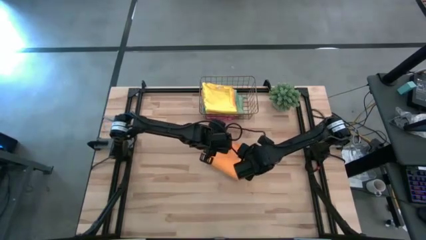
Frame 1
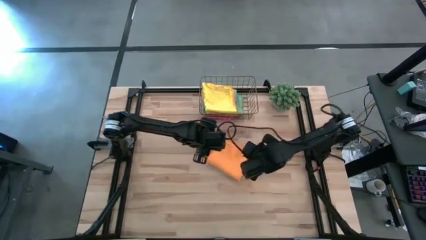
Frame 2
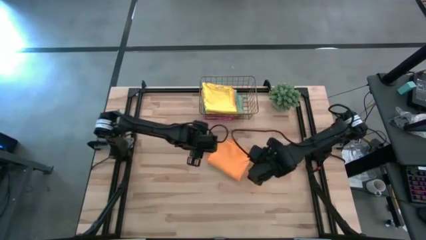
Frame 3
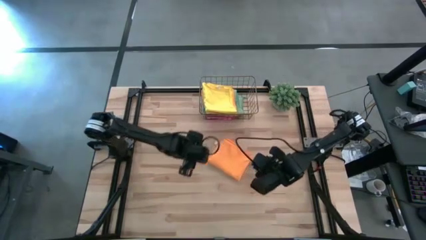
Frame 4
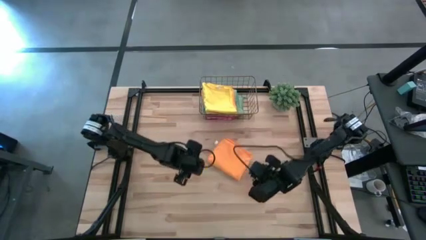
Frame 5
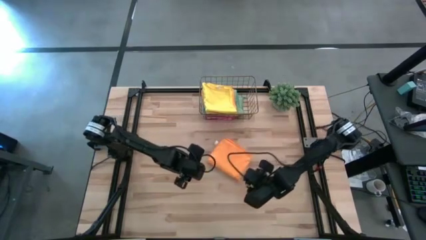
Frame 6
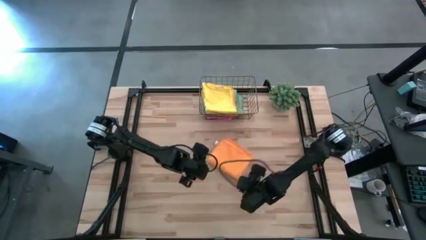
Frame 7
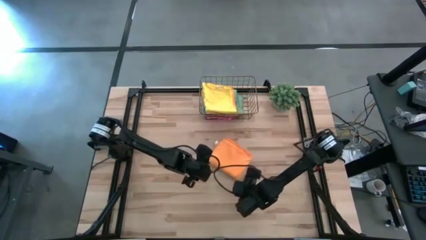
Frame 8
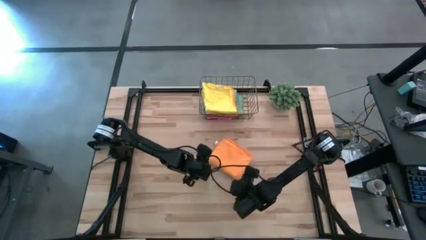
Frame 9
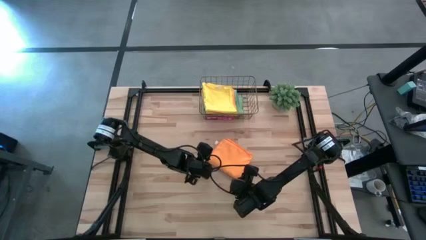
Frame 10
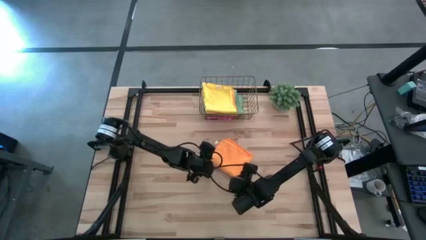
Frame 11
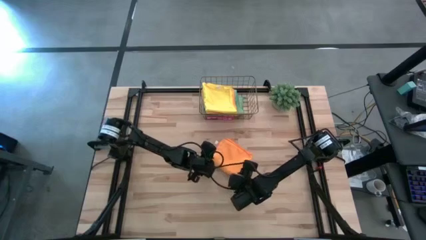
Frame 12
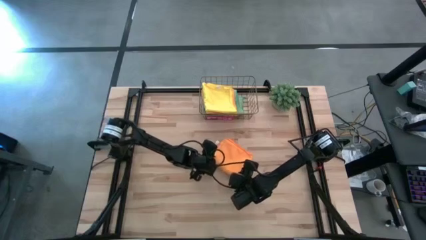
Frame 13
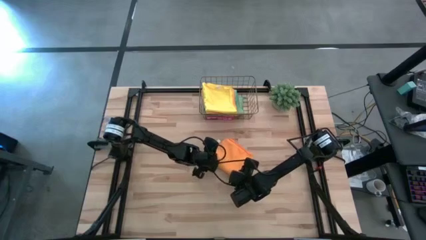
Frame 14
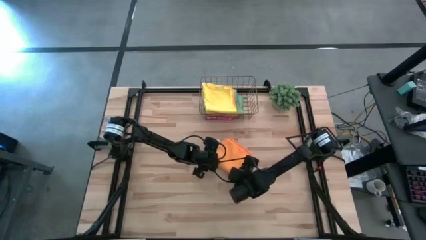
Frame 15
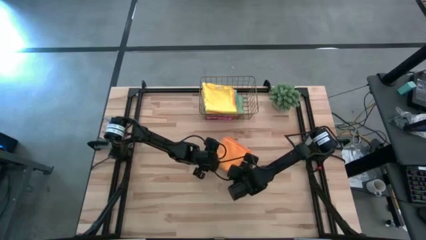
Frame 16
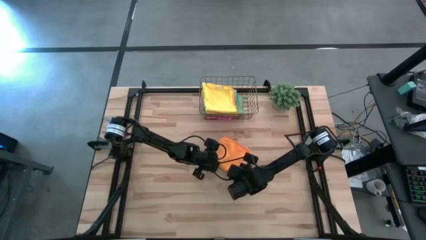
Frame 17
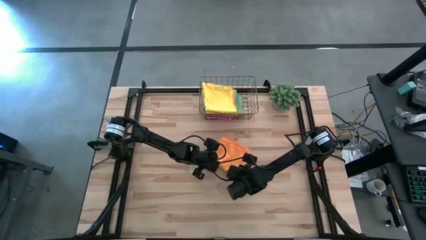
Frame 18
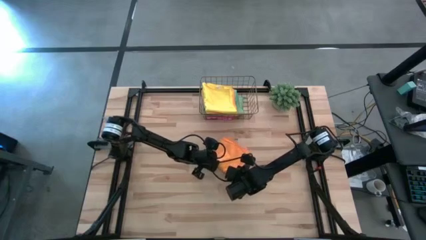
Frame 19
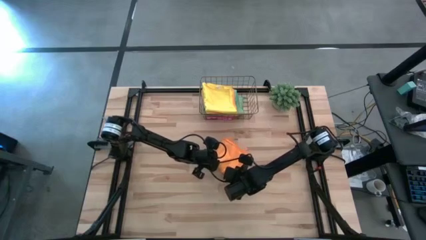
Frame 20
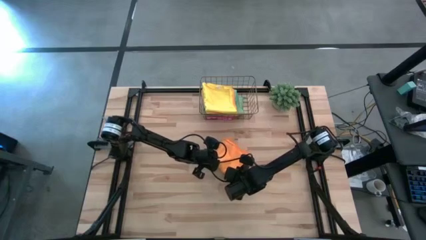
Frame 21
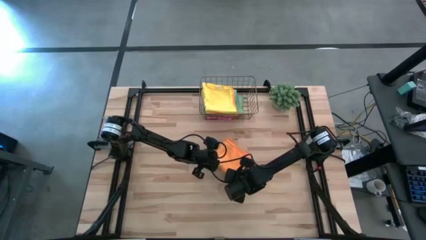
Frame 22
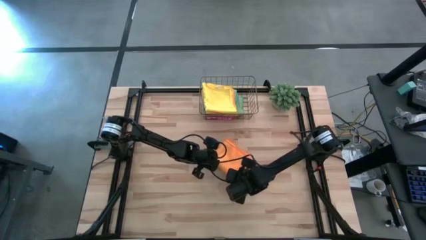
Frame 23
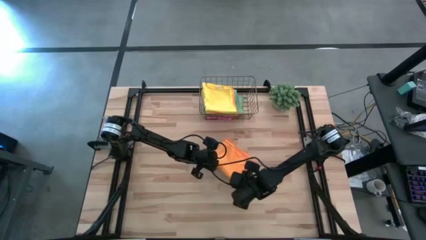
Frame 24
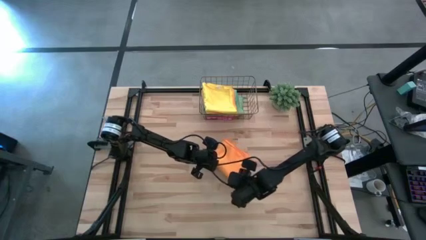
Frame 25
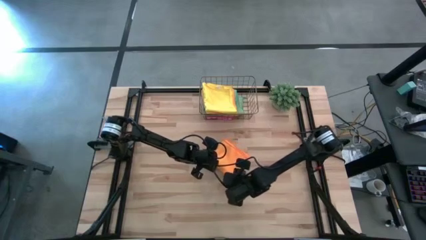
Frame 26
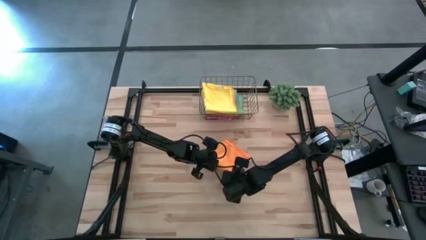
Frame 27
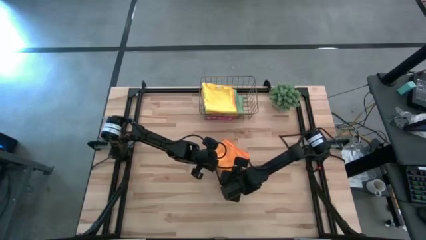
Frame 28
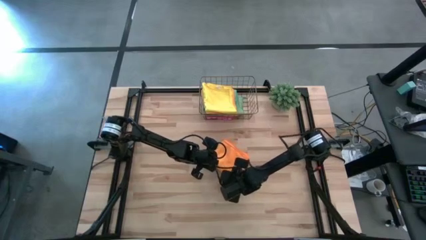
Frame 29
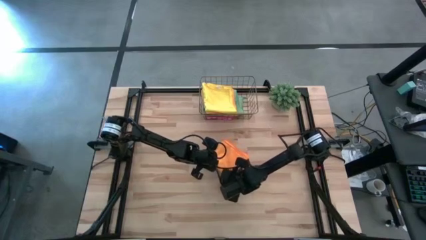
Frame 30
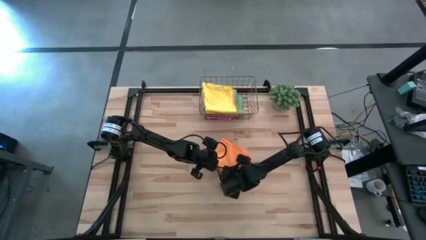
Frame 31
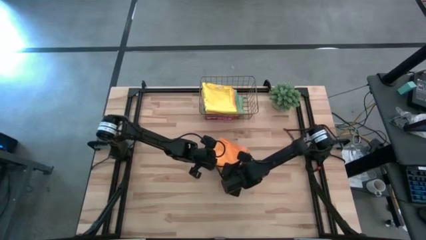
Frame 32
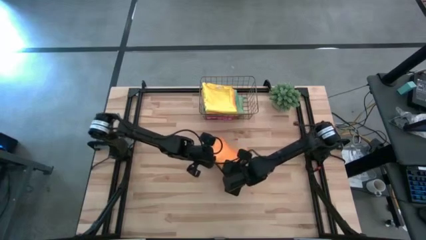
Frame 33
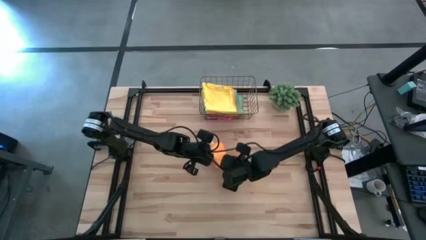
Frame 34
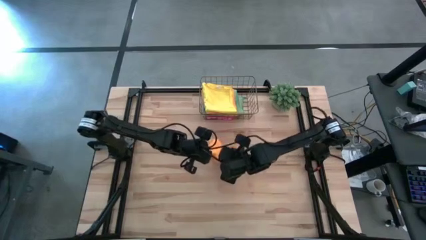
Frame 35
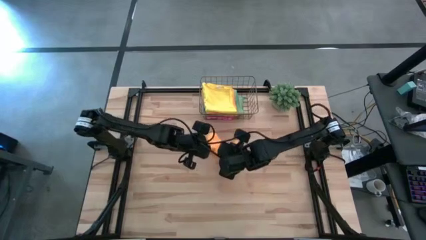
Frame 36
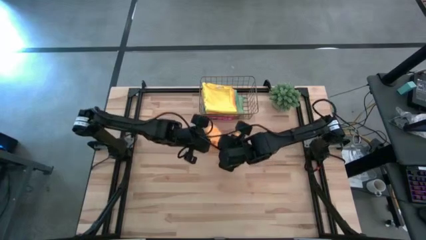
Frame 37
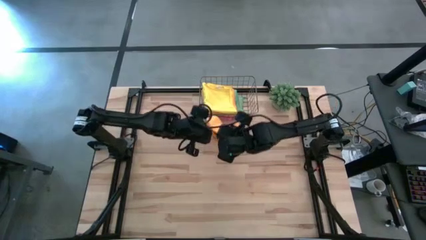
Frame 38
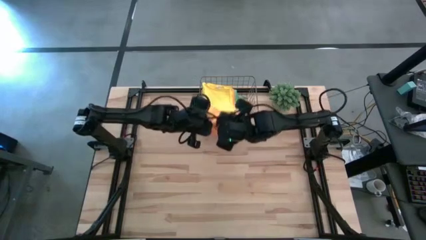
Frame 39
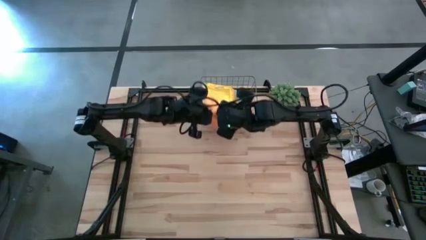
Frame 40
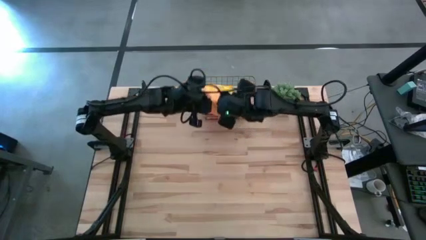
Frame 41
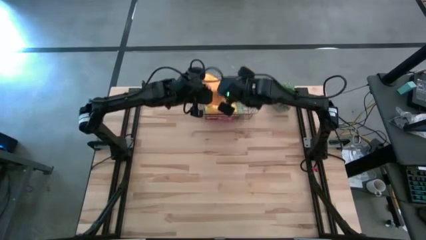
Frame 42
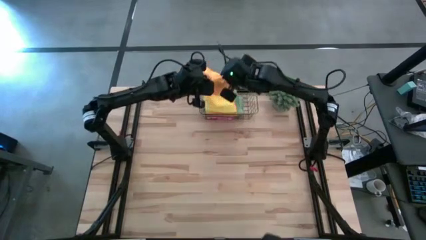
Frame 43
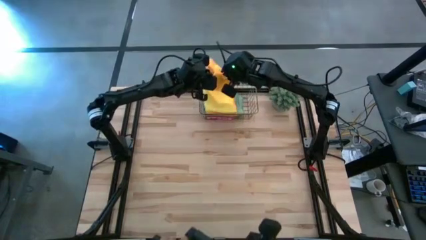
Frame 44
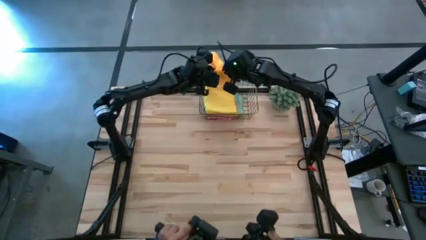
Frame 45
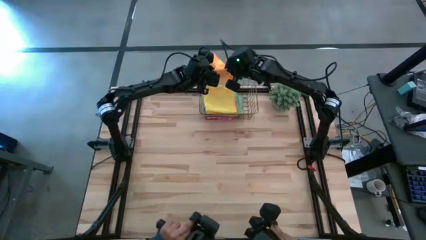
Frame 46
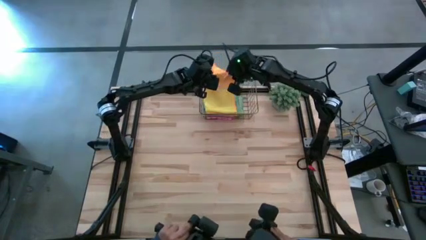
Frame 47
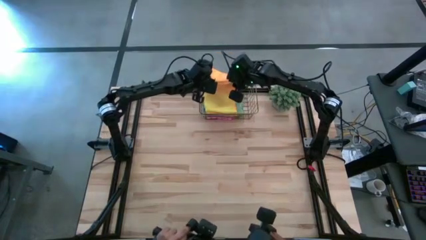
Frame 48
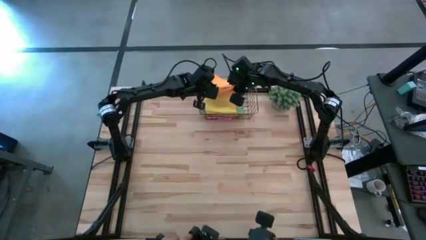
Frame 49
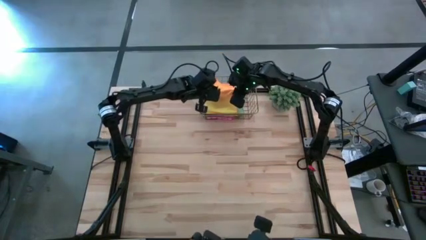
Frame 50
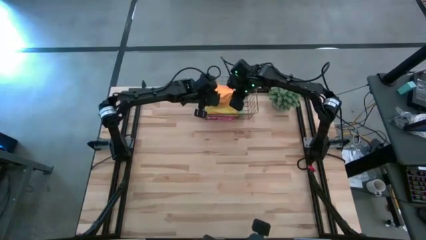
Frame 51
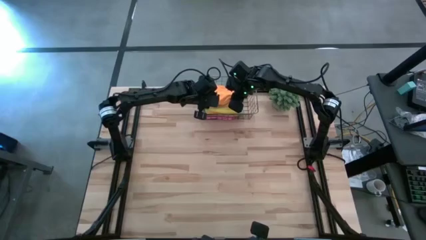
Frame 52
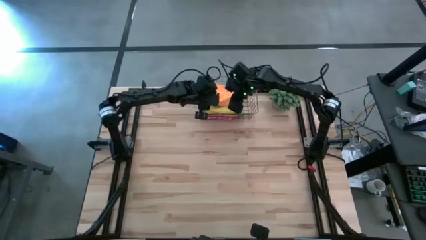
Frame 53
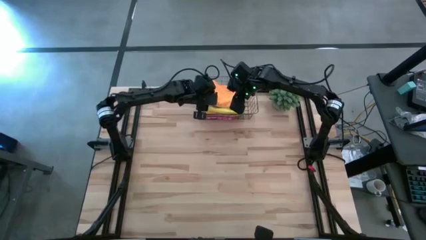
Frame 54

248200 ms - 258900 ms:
Task: Fold microfiber towels
Stack the folded orange microfiber cloth on top of the folded yellow microfiber cloth

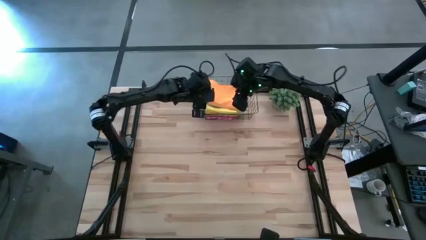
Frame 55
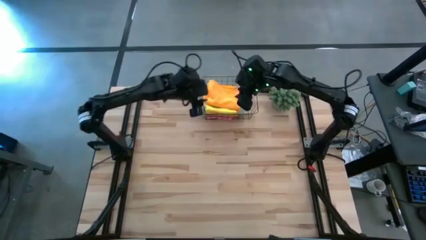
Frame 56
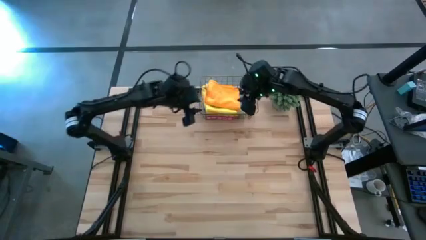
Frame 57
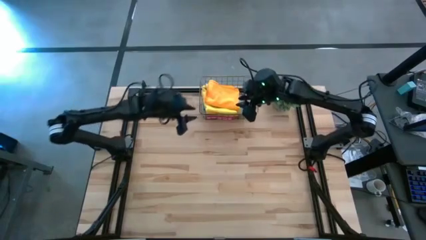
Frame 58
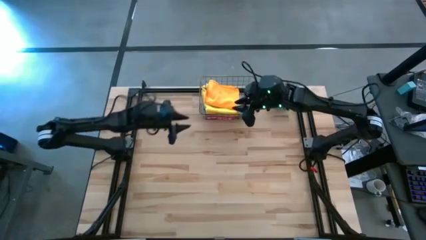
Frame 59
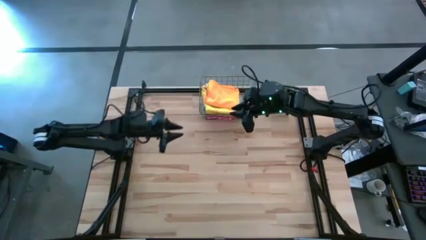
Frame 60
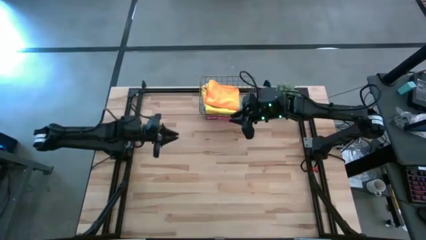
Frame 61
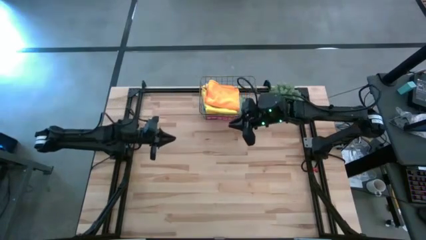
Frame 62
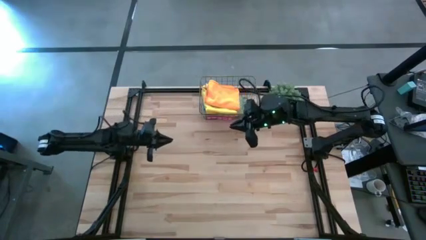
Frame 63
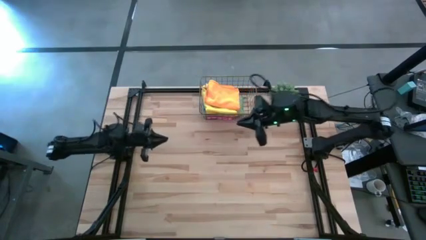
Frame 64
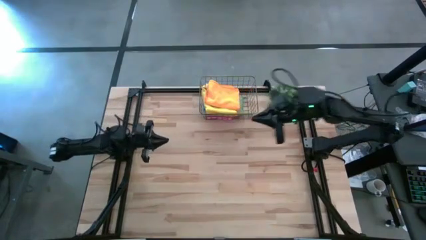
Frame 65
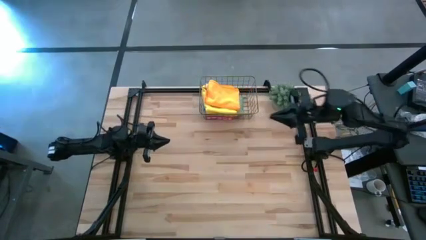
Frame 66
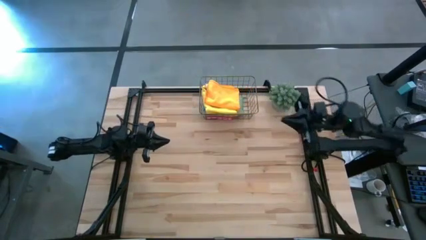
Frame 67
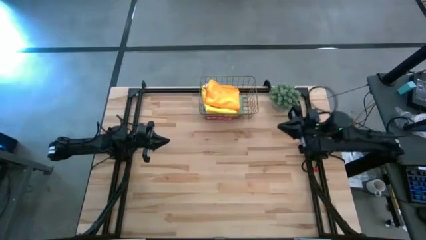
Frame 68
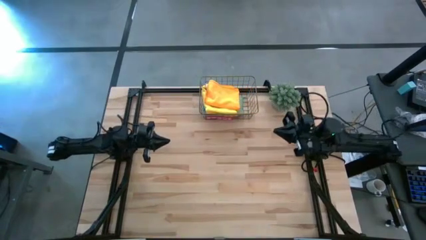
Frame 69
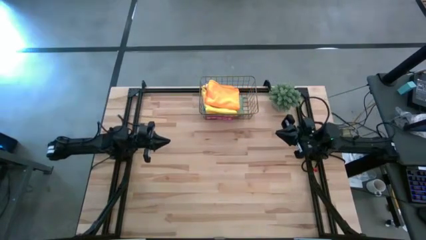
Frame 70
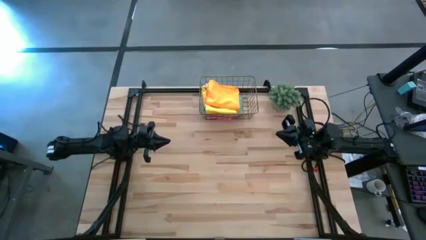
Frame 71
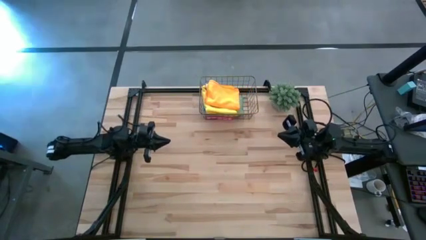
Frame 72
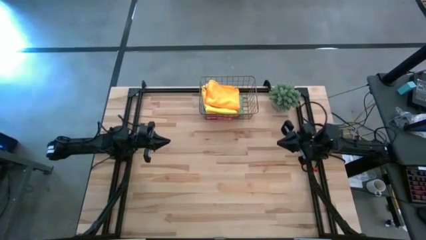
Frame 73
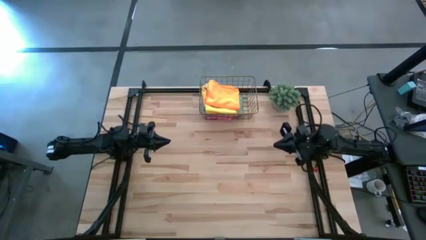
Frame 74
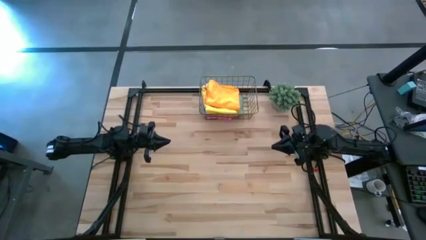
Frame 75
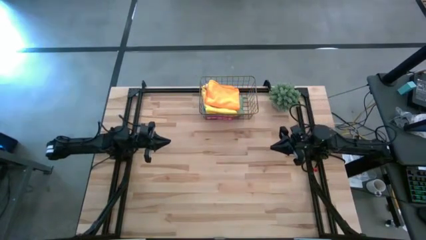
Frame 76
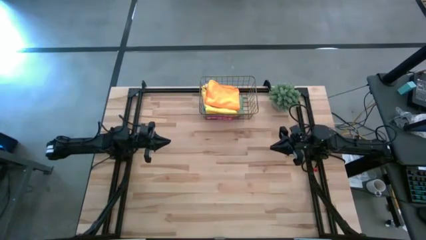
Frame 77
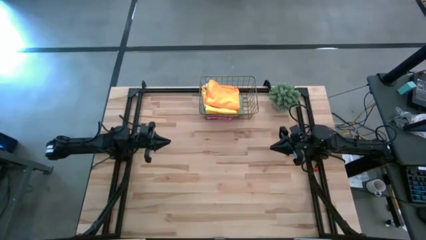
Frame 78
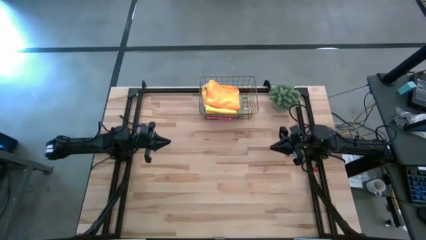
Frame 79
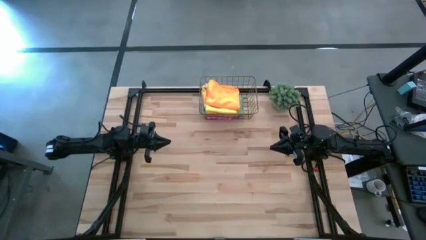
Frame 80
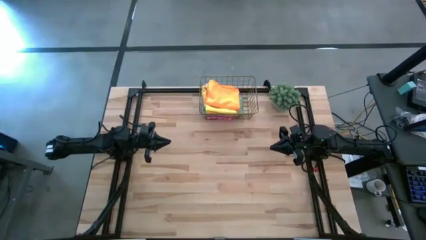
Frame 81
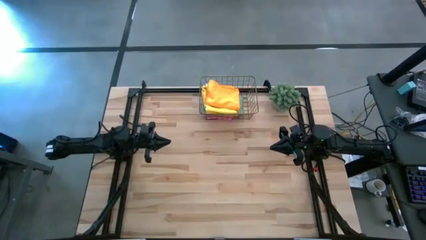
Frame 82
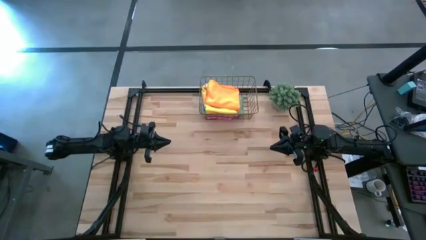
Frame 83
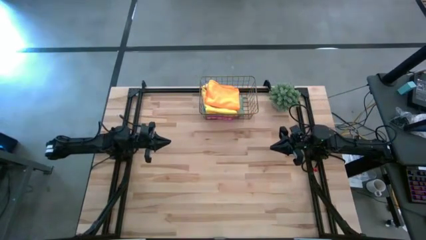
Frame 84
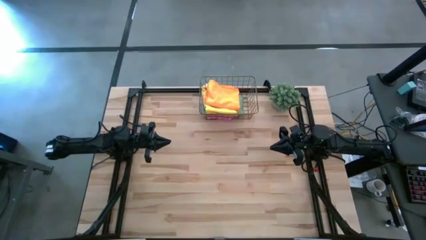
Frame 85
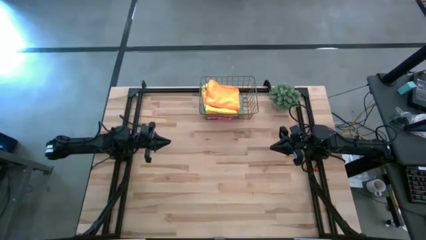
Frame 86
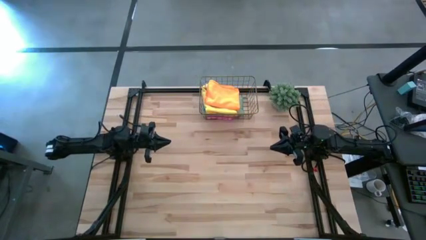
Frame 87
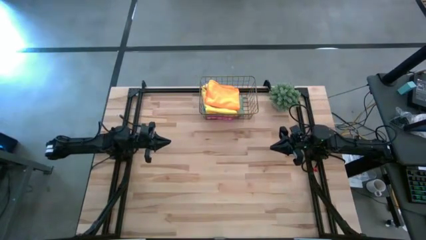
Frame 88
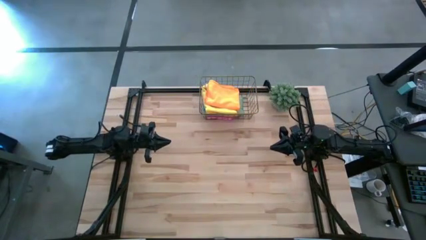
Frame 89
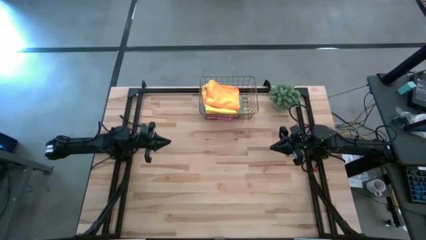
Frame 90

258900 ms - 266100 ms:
Return to Home Position
